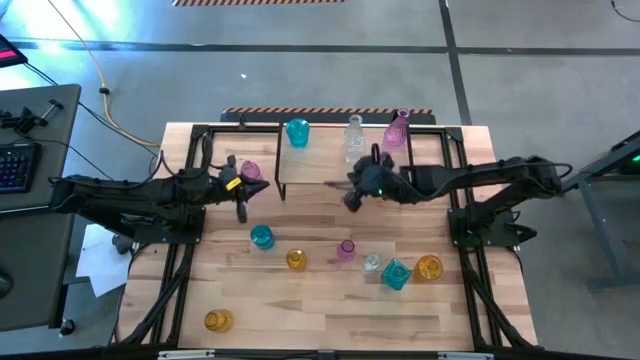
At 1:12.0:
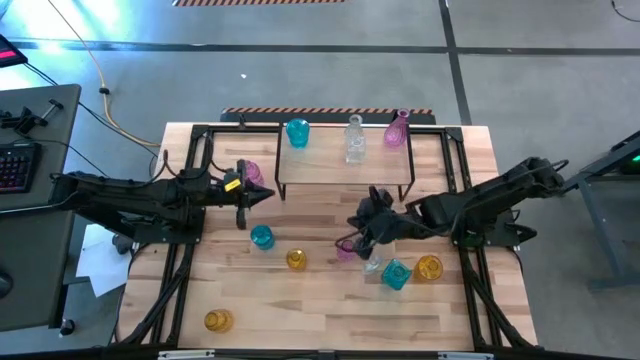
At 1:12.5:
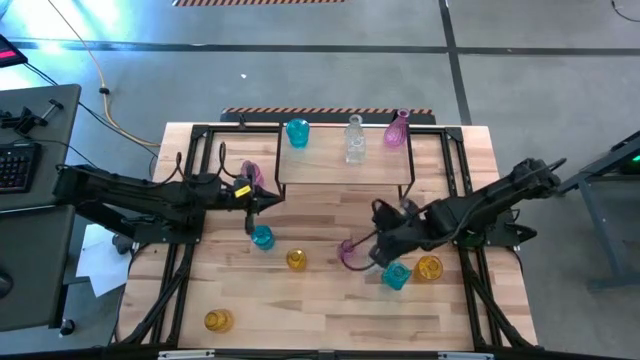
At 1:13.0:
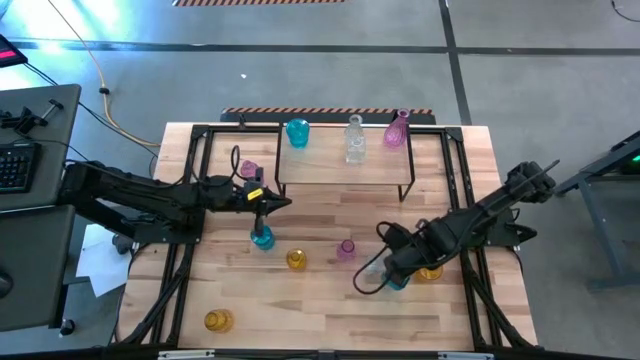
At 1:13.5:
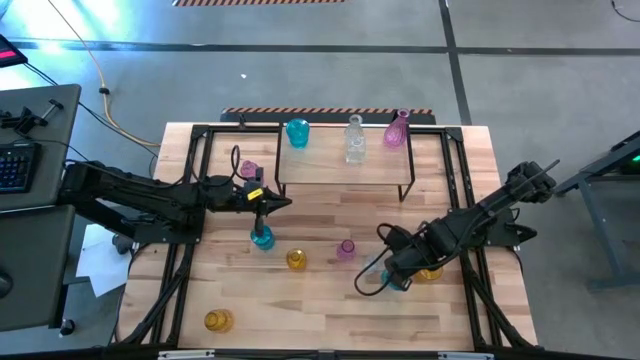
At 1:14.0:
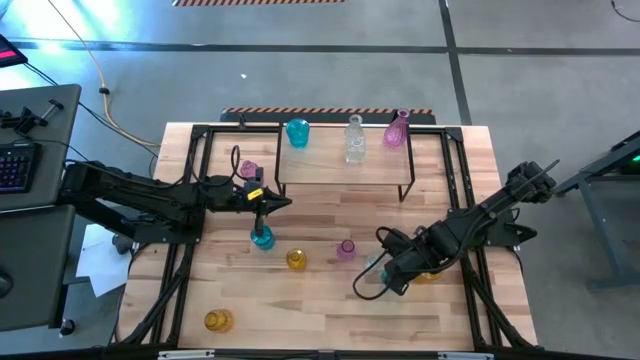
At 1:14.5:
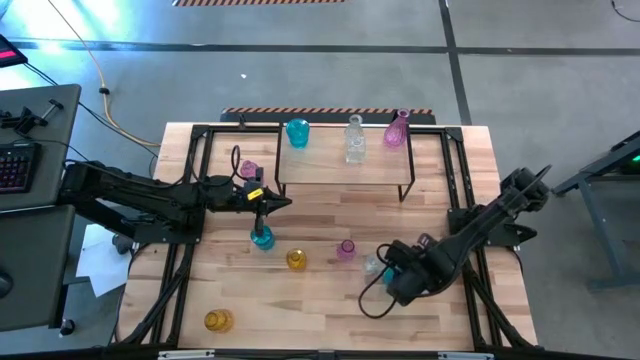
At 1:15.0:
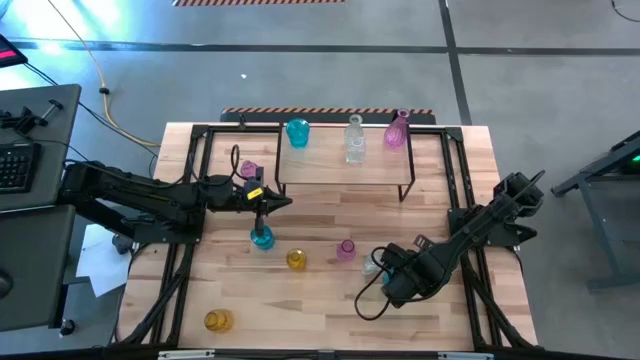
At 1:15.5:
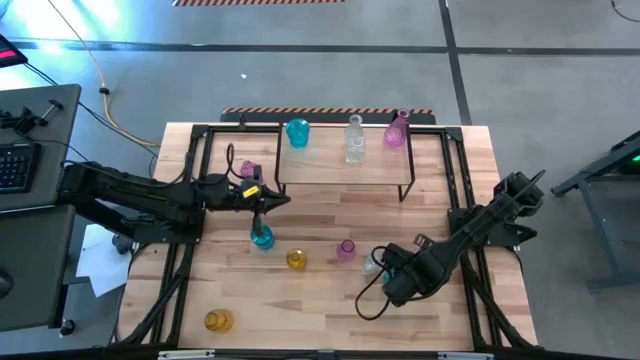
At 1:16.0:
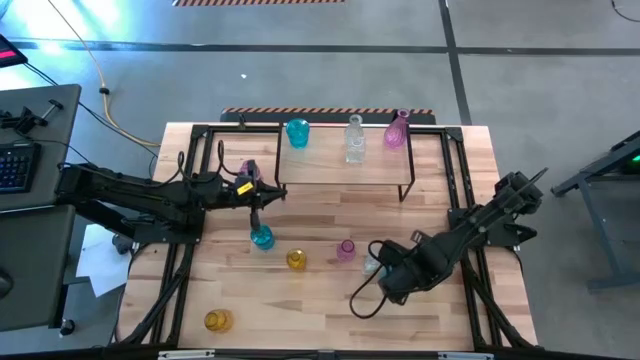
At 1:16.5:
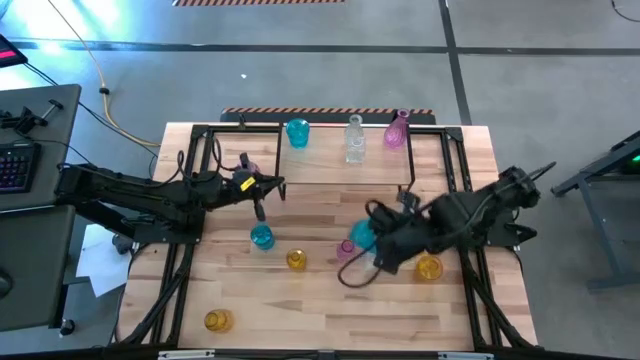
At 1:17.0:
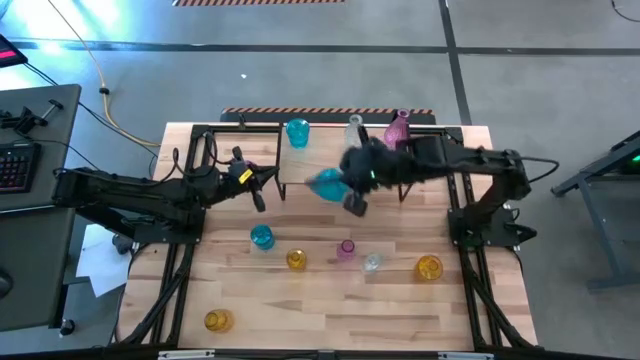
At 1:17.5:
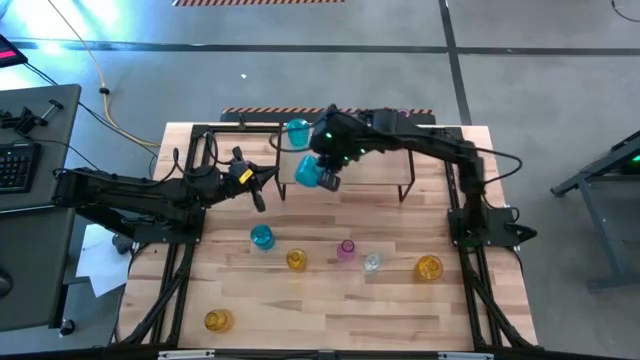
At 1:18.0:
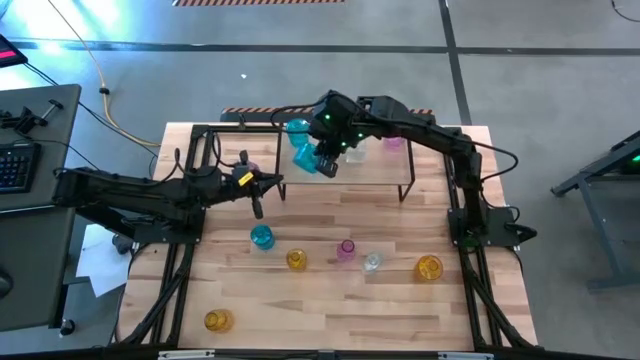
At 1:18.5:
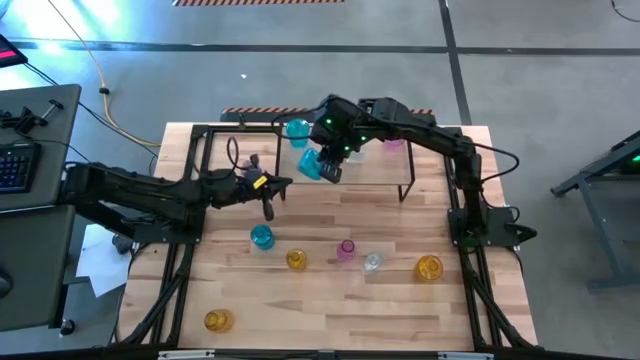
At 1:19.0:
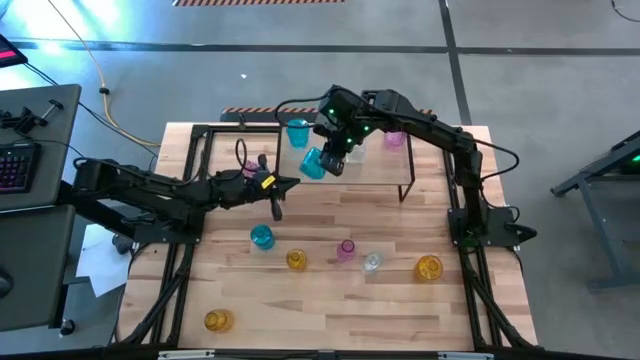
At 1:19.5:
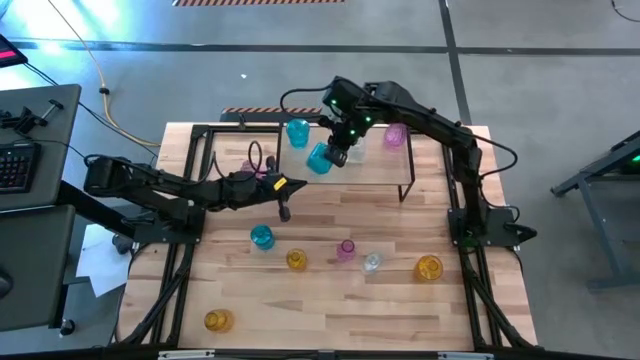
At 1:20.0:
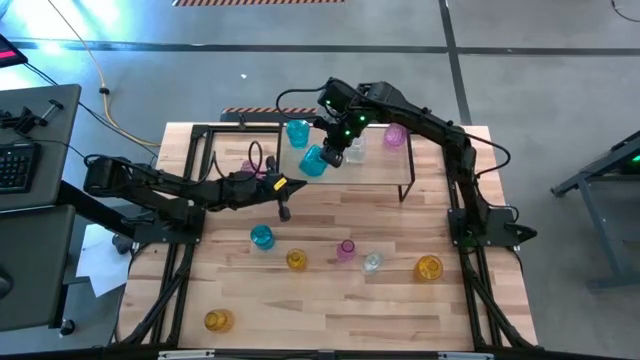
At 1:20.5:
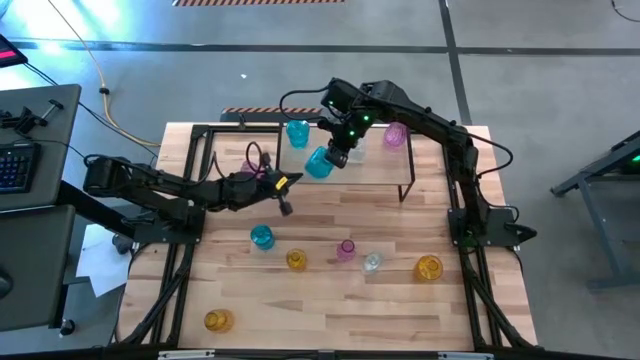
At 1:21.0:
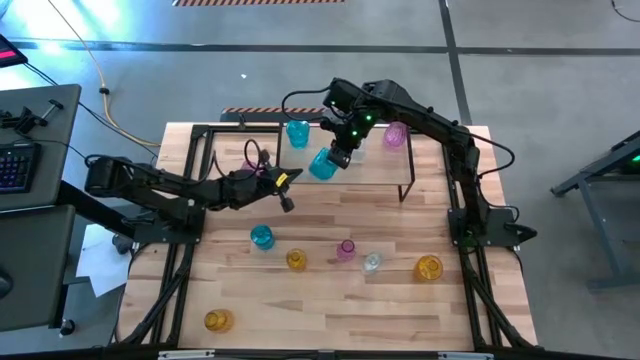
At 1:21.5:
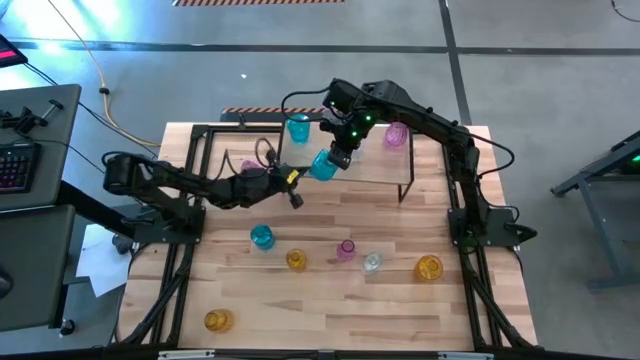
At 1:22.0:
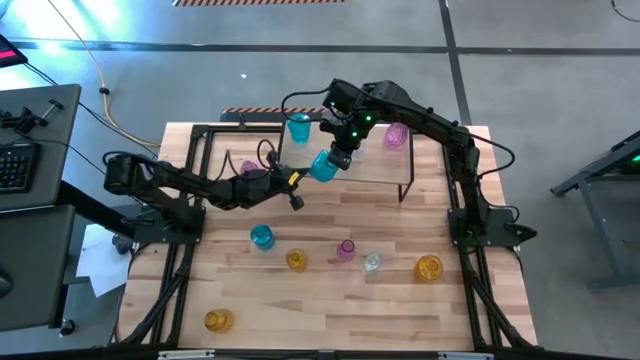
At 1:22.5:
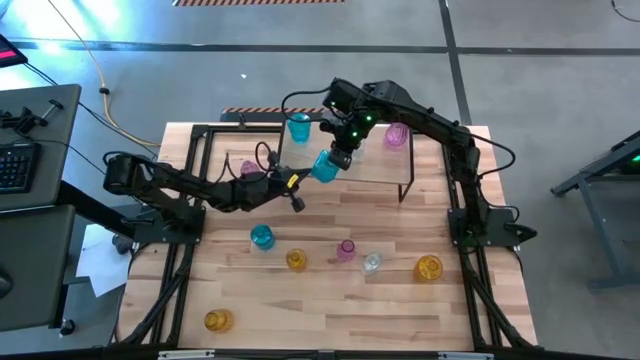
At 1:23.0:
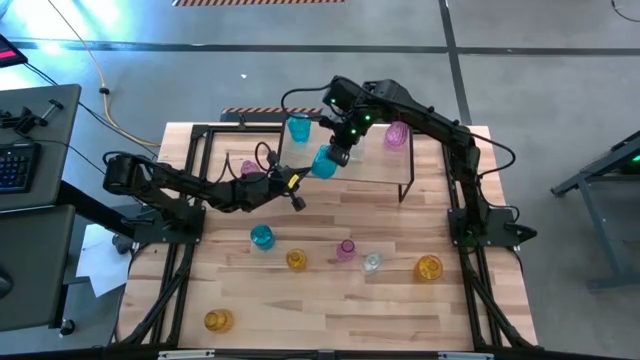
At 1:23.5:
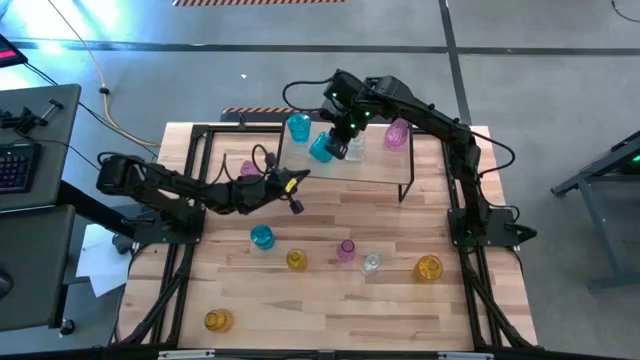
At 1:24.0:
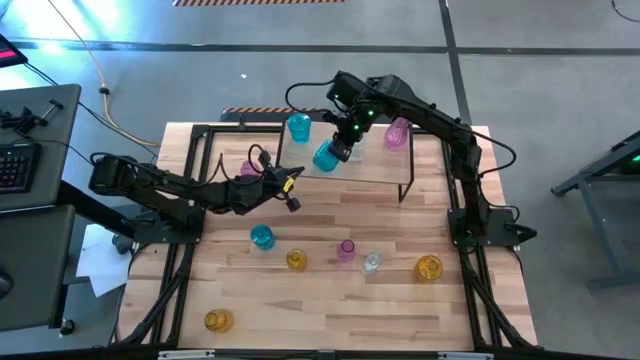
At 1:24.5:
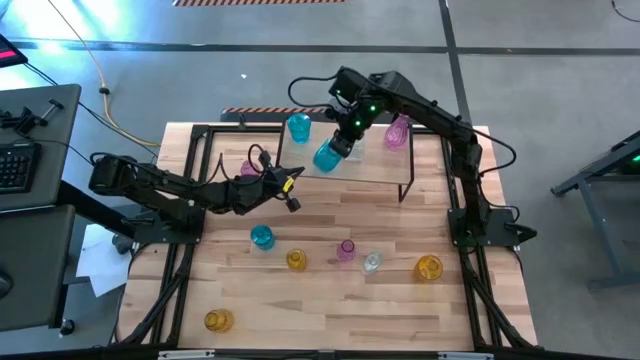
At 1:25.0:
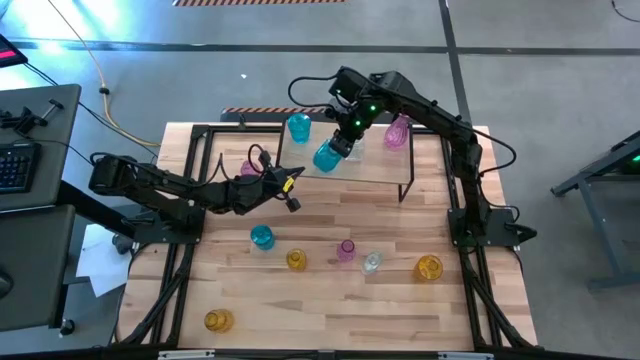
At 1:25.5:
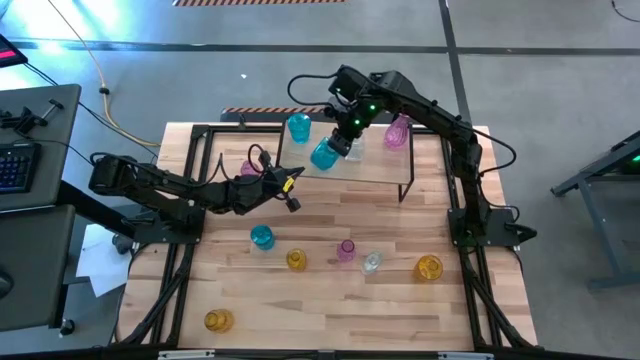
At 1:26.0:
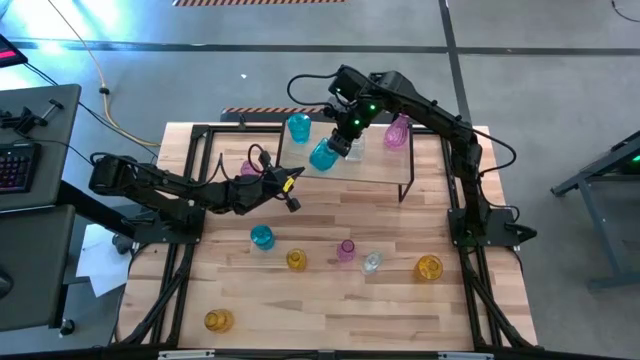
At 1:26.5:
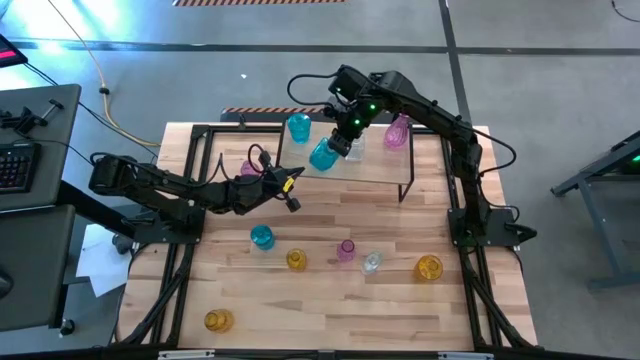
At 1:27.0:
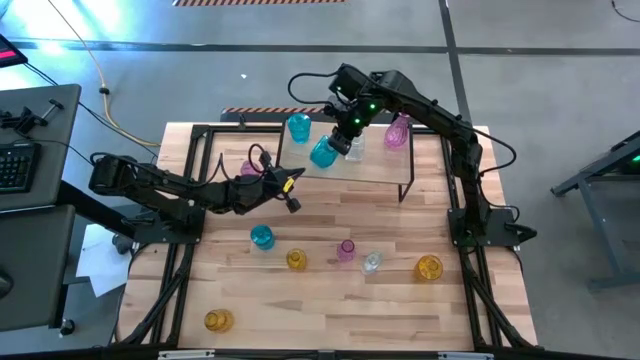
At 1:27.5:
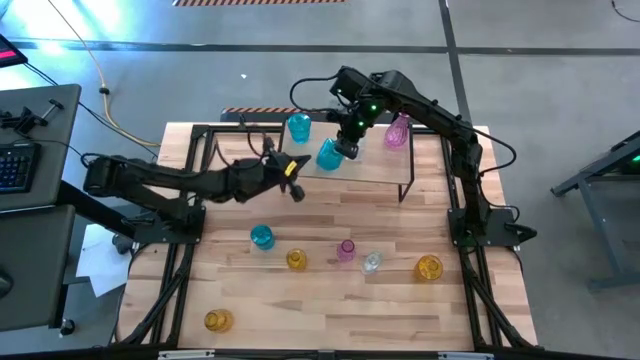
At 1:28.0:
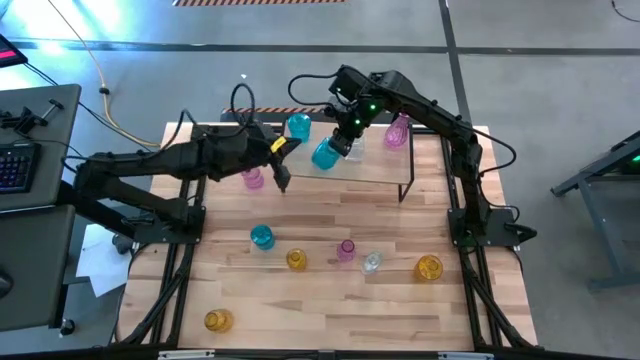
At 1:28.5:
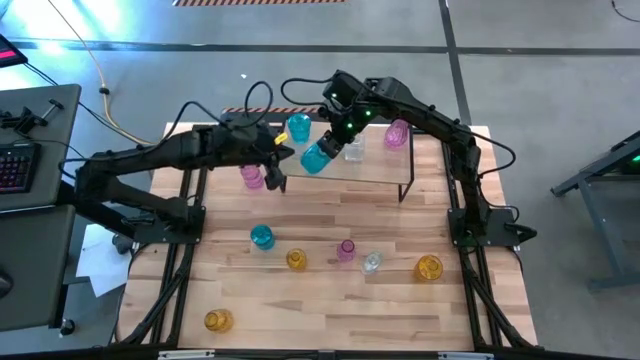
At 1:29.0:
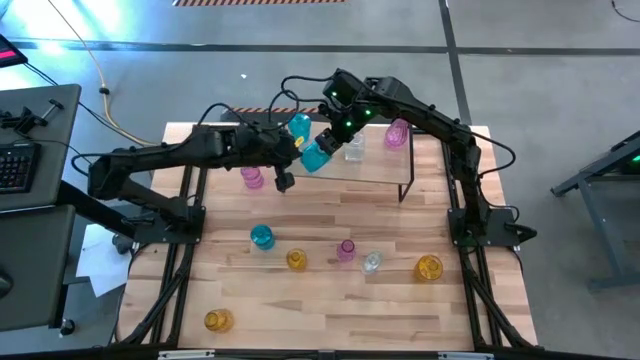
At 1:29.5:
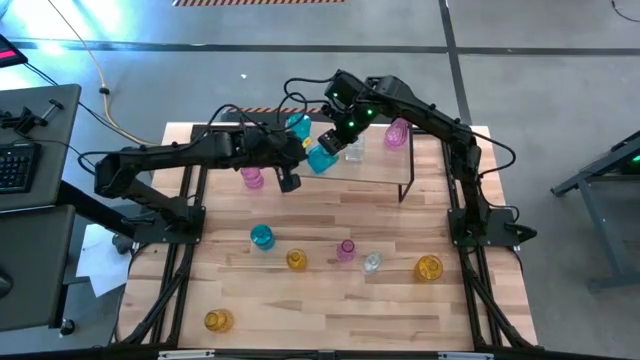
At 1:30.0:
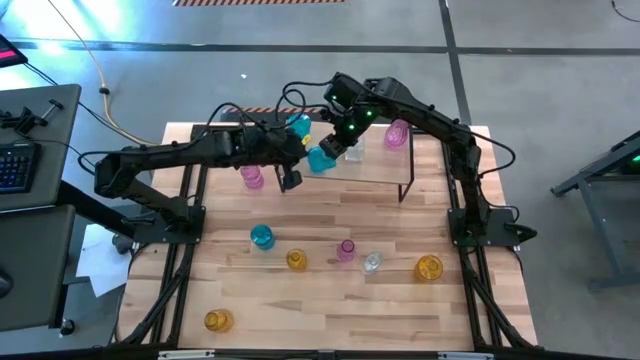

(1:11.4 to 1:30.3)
Task: sort vases onto shelf
Put the right blue vase on the shelf aligned with the other blue vase

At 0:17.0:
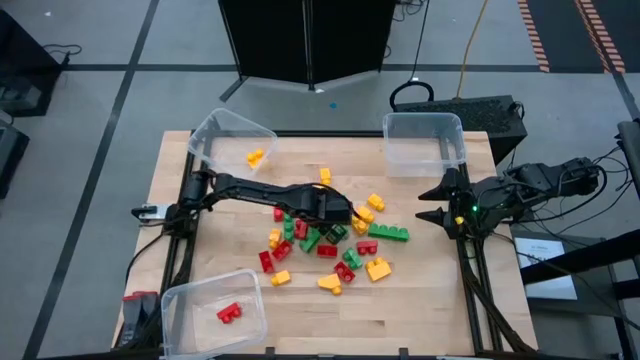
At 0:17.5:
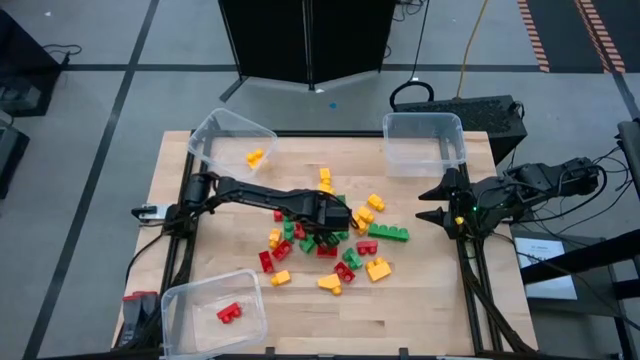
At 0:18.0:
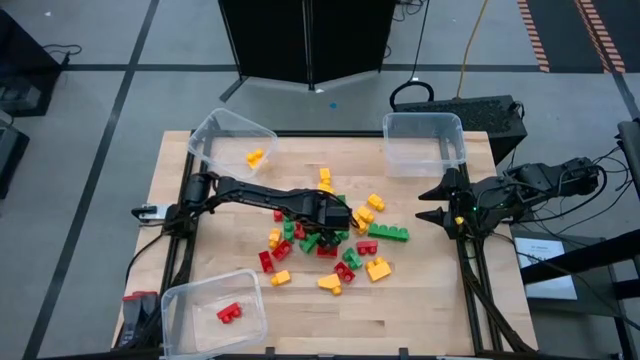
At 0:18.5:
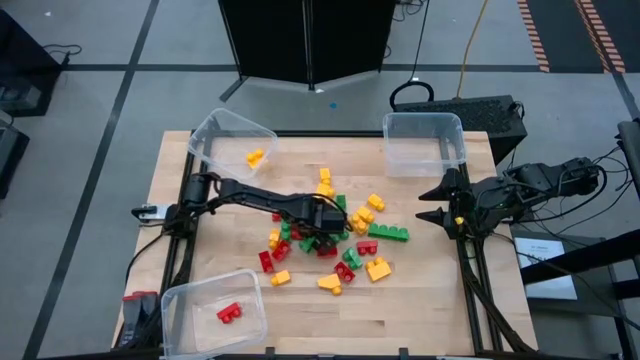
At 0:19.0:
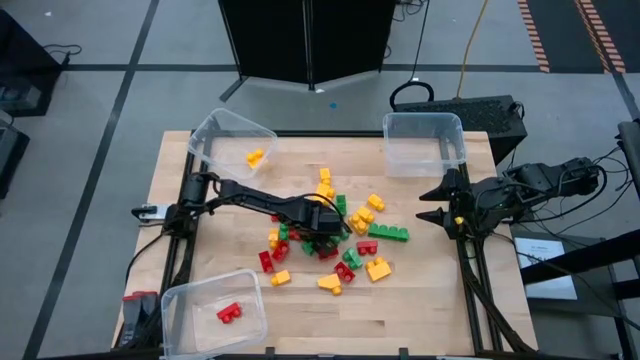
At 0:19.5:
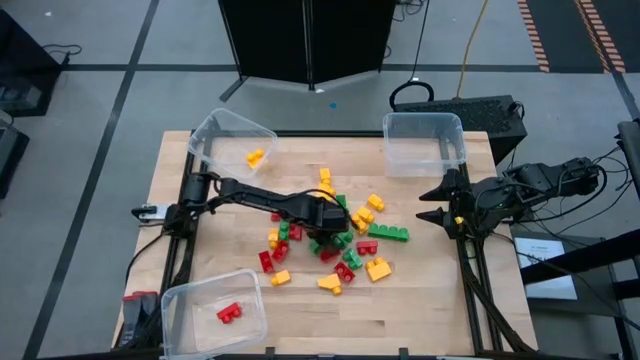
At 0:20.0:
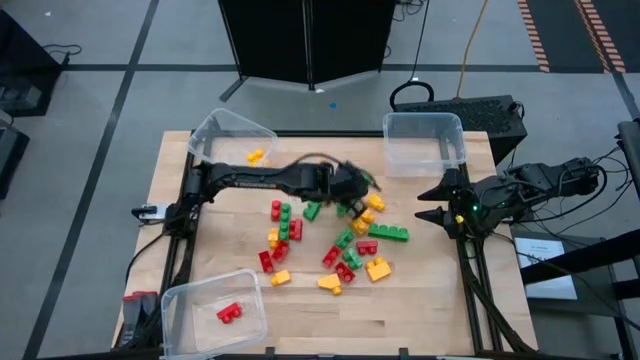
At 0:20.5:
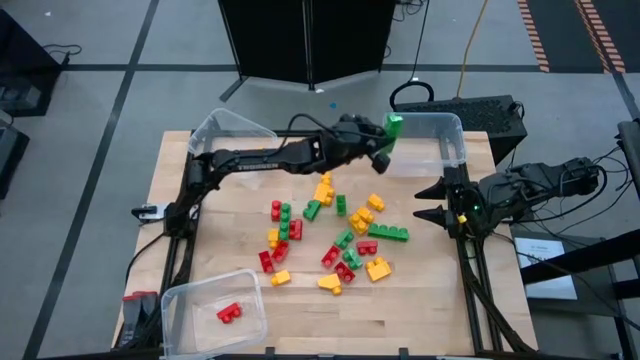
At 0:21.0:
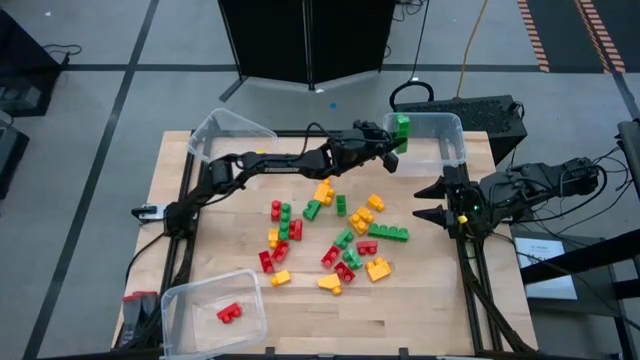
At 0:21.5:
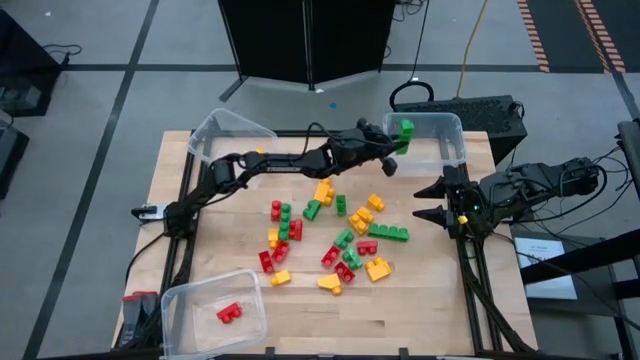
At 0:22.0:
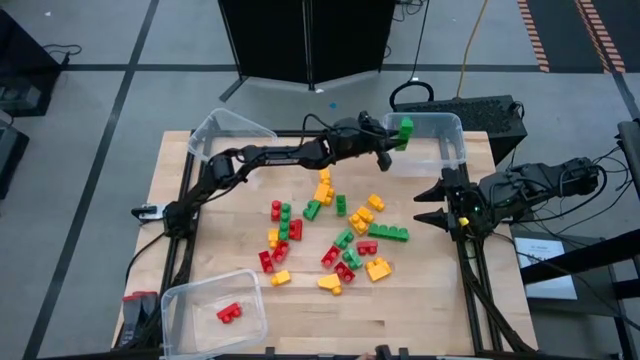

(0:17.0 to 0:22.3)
Task: Sort blocks
Put the green game piece into the top right transparent bin
